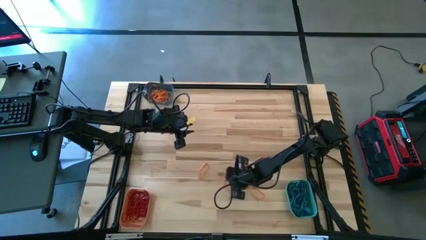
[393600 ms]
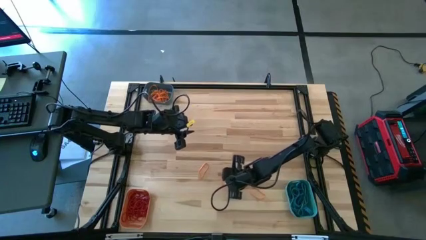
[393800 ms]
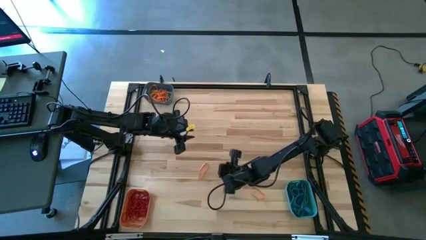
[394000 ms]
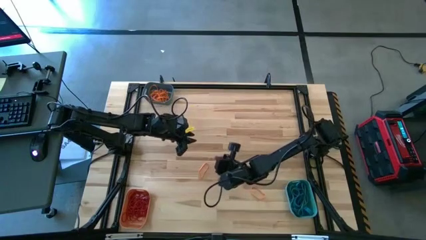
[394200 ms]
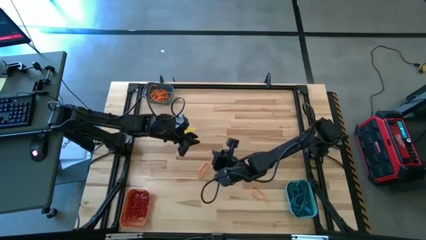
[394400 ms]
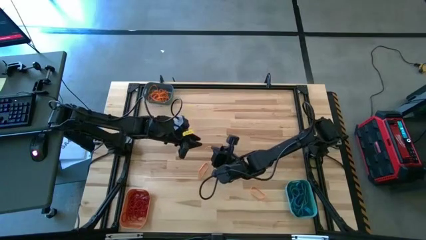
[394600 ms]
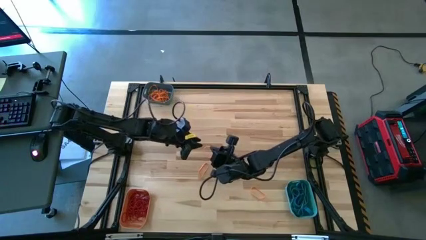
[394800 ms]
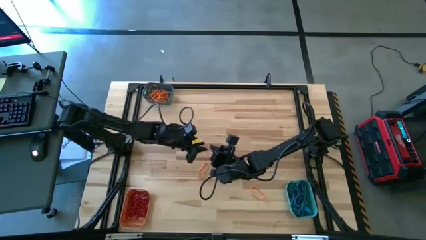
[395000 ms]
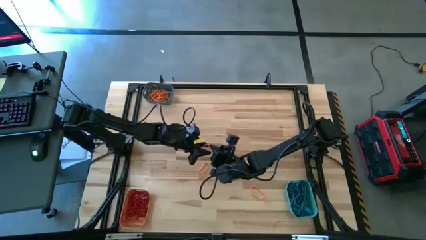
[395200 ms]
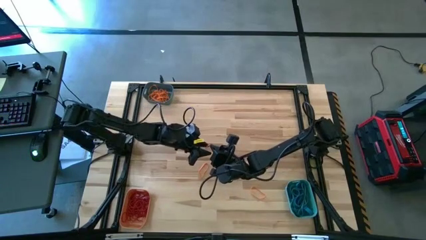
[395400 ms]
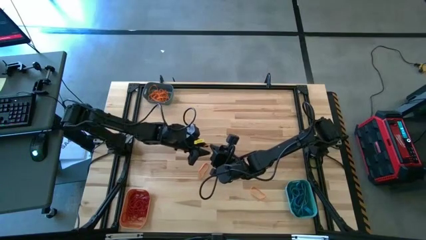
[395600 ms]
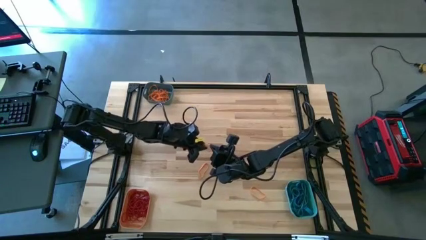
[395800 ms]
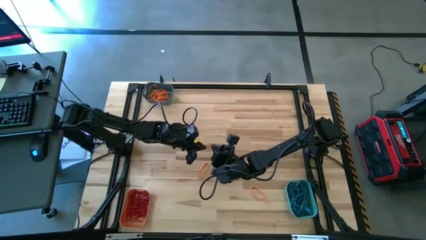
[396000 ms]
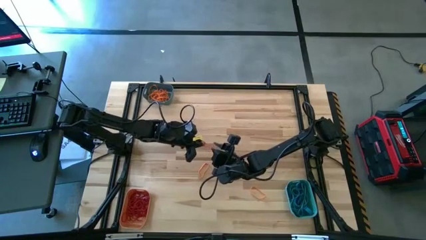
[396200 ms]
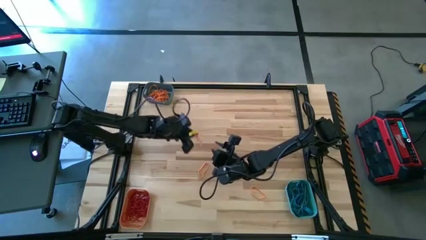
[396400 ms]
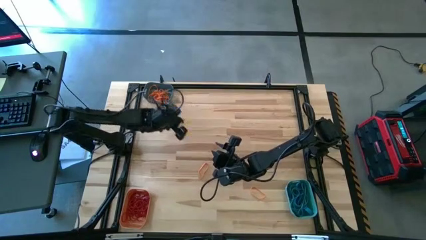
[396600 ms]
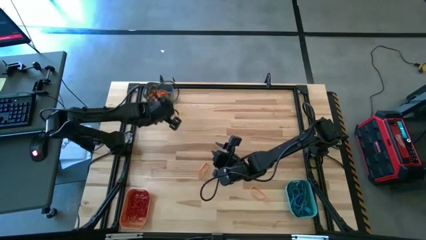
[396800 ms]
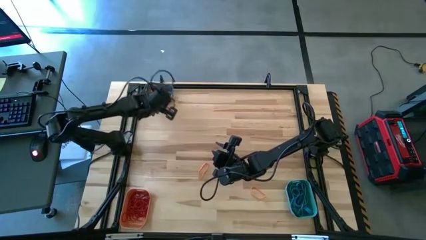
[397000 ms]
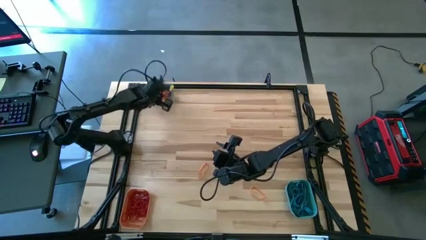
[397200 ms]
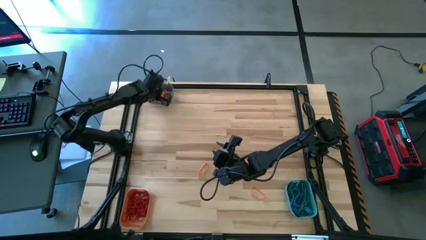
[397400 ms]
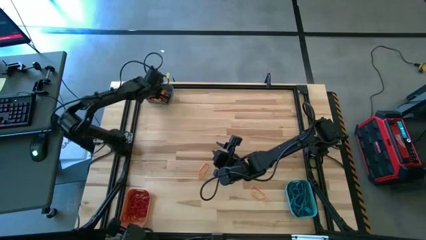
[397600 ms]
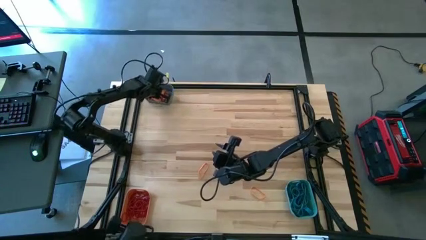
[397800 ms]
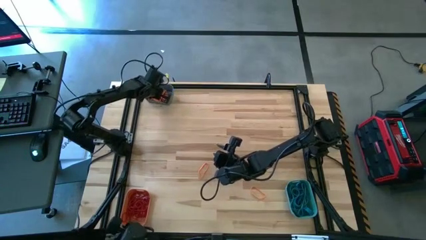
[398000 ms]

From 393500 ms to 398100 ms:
Task: Sort rubber bands into baskets
Put the orange rubber band into the blue bin

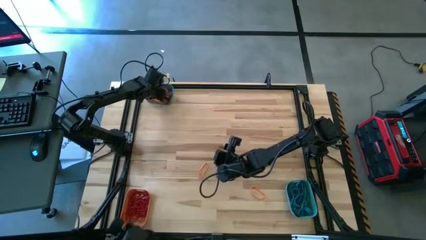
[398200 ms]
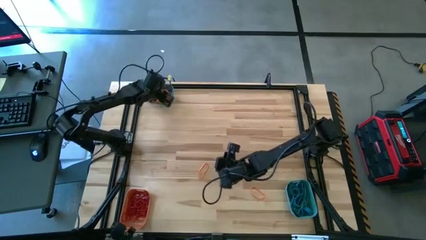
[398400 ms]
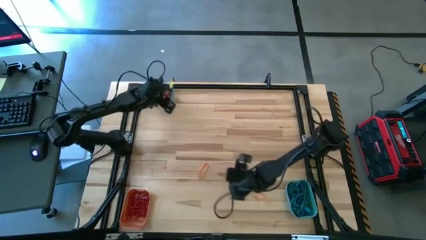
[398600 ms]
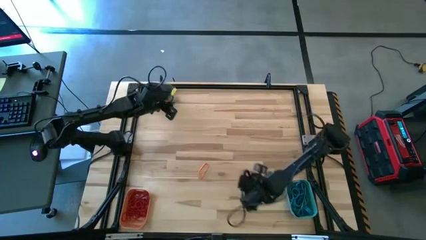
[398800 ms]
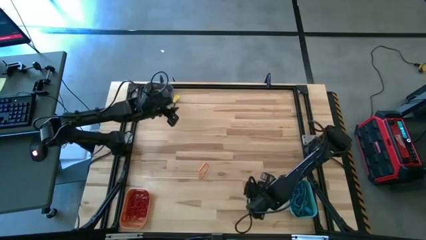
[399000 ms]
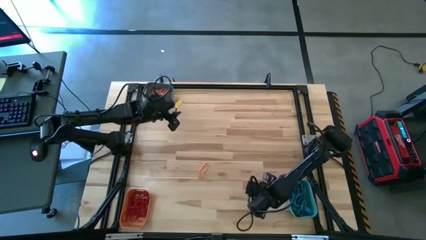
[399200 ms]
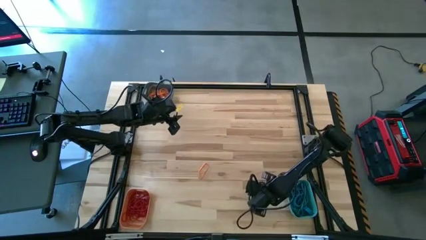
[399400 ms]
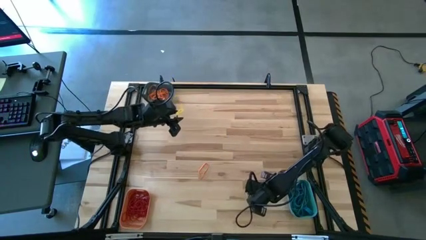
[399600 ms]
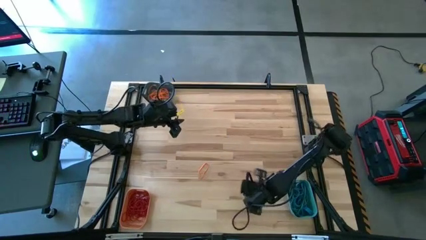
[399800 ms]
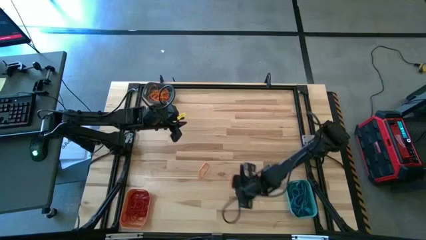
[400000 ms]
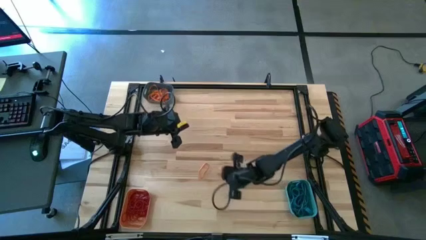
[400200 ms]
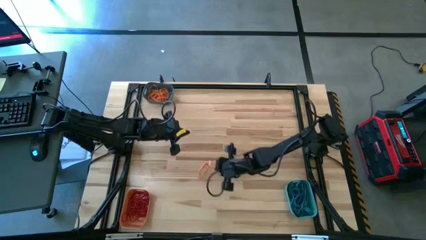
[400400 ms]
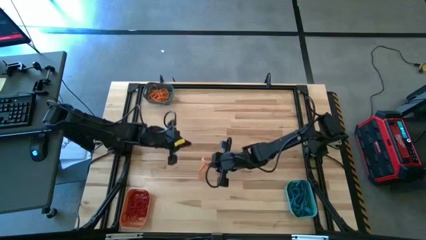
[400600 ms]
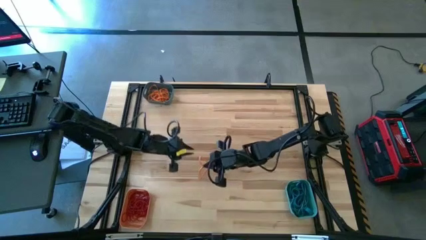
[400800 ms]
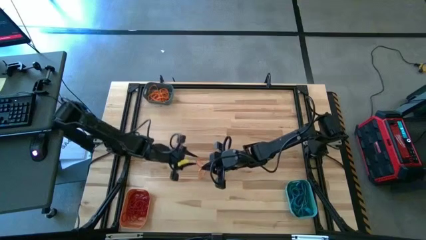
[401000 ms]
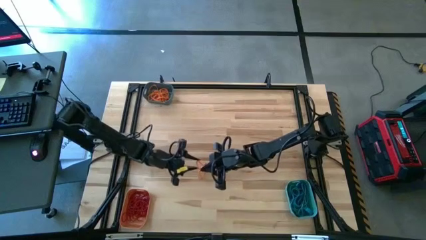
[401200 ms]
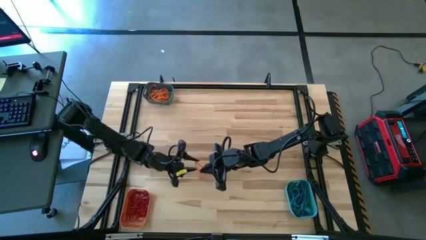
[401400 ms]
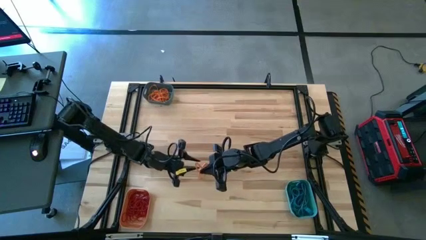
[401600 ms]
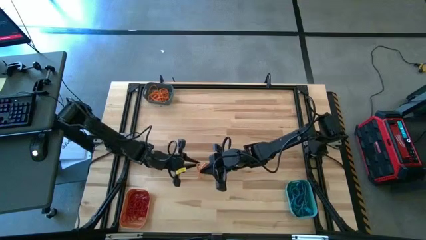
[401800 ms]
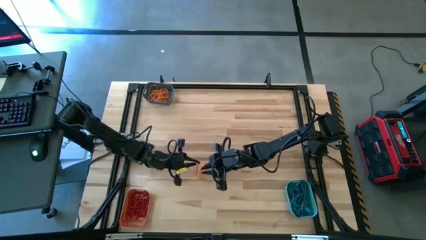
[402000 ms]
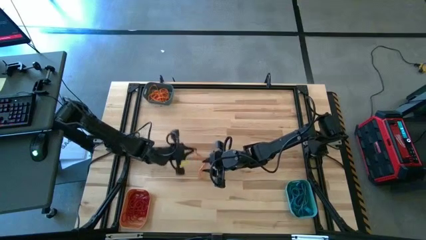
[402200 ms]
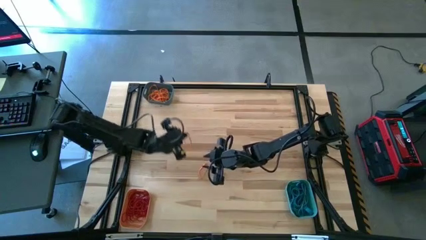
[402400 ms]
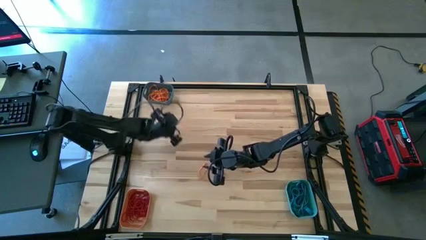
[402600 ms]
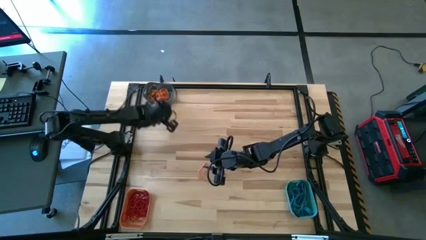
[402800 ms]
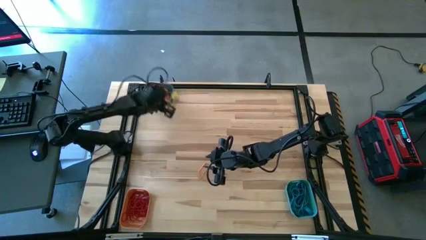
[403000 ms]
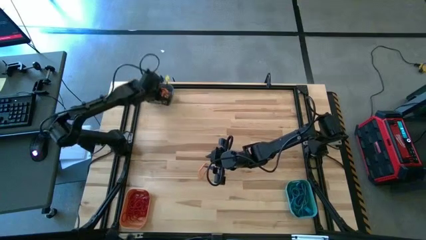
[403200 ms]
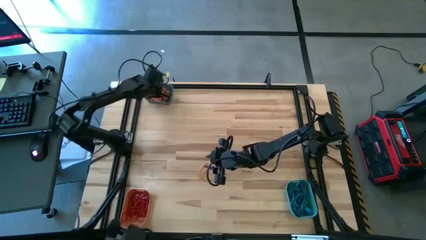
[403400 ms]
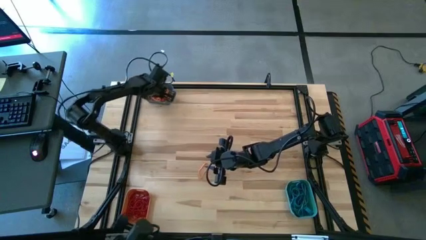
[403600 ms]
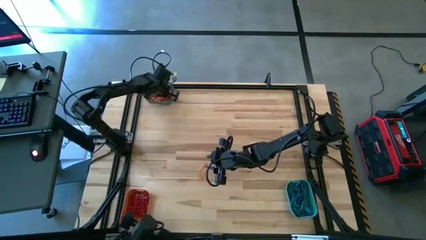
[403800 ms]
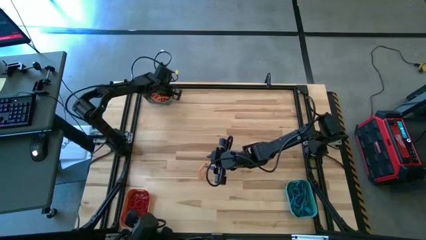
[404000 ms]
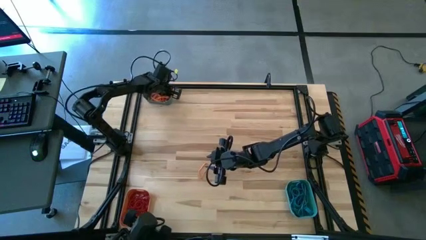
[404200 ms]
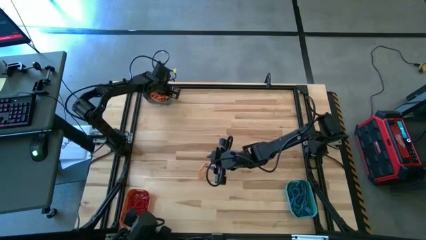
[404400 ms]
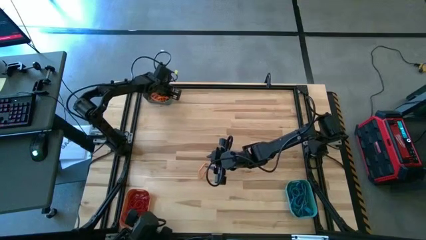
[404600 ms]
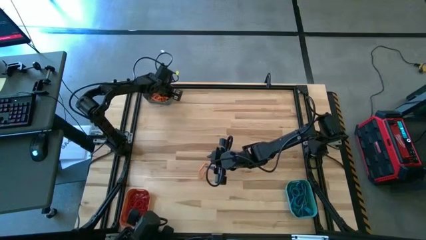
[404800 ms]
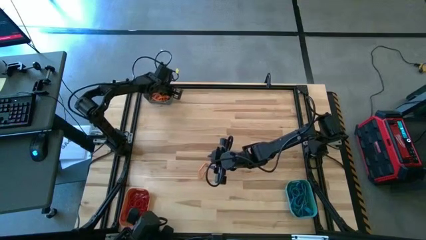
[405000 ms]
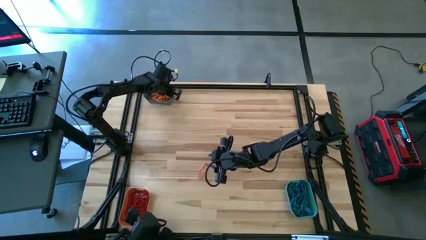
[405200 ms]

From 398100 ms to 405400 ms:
Put the orange rubber band into the blue bin

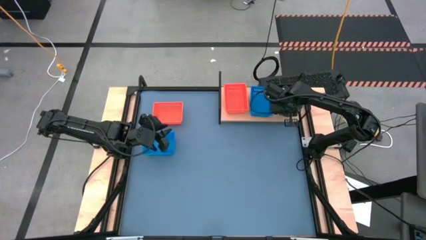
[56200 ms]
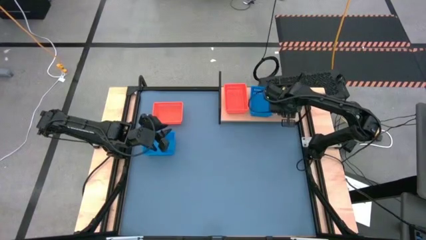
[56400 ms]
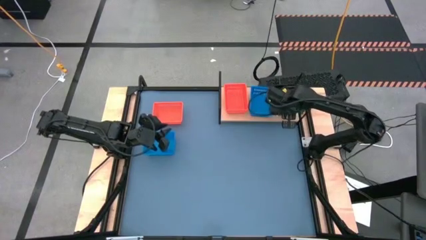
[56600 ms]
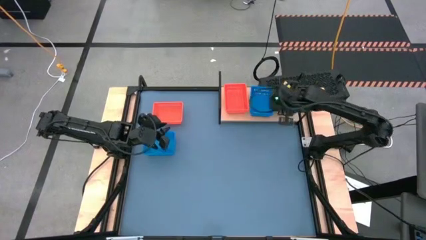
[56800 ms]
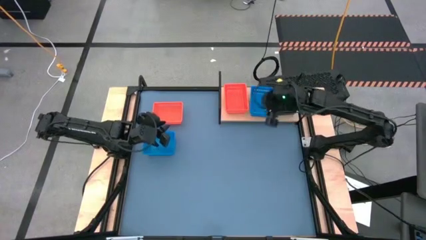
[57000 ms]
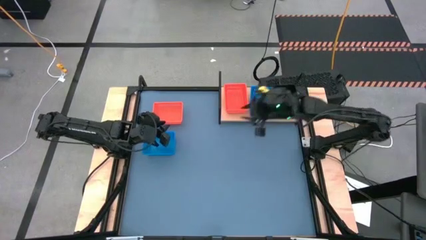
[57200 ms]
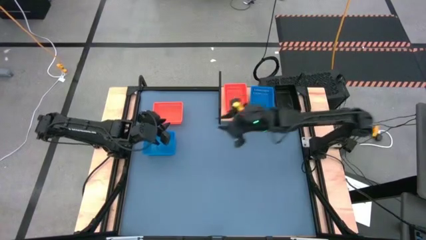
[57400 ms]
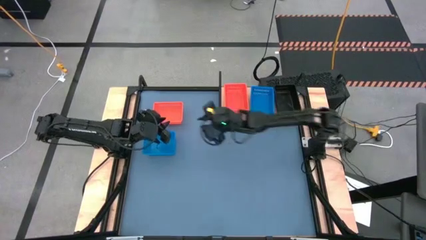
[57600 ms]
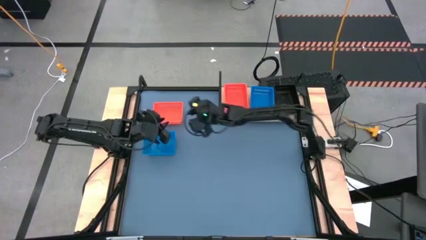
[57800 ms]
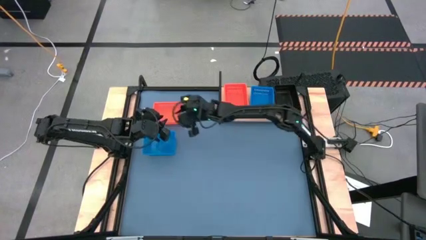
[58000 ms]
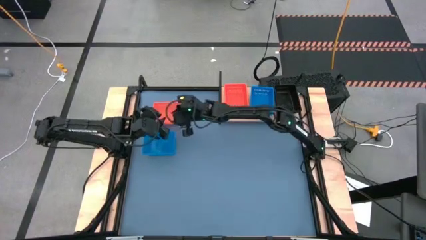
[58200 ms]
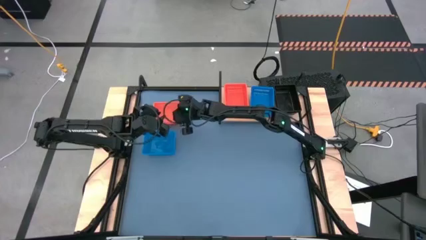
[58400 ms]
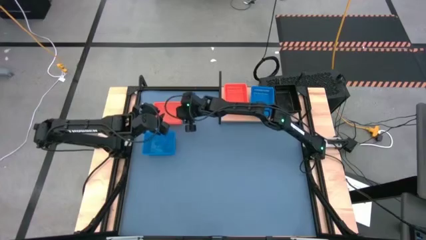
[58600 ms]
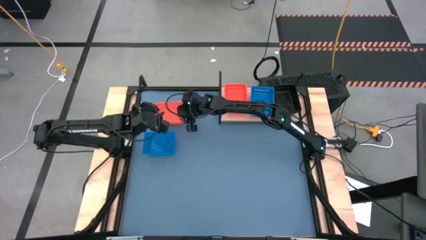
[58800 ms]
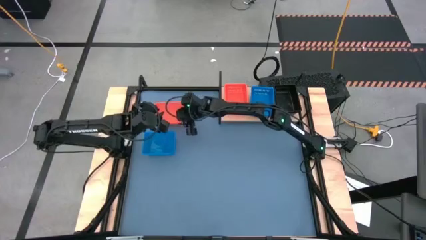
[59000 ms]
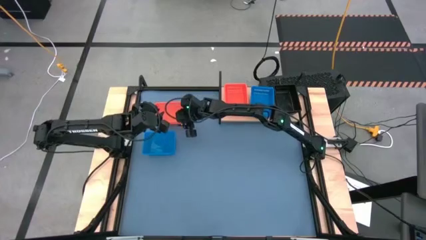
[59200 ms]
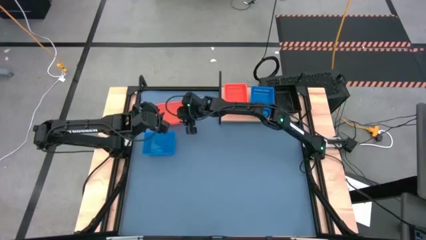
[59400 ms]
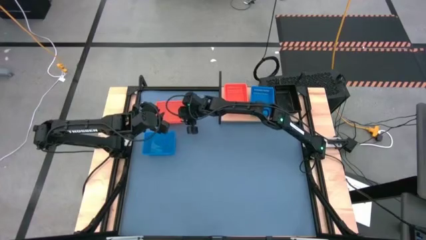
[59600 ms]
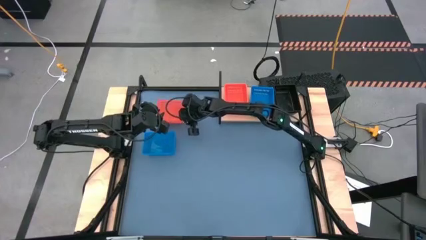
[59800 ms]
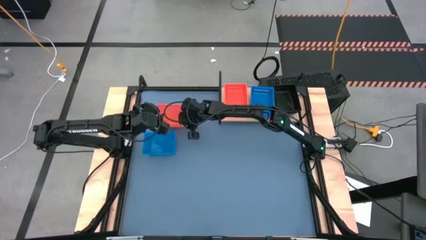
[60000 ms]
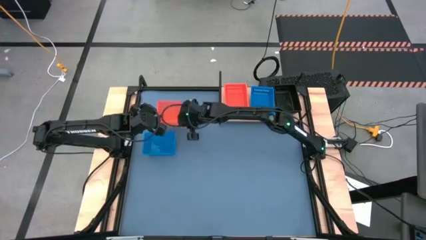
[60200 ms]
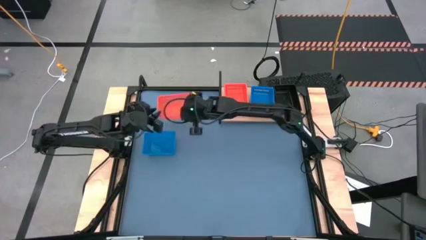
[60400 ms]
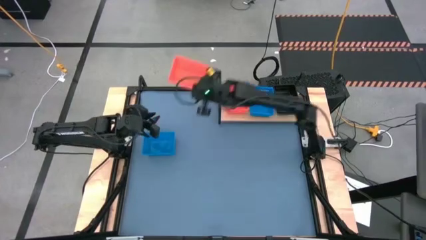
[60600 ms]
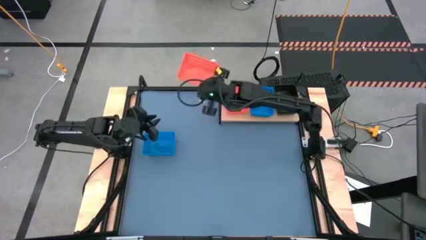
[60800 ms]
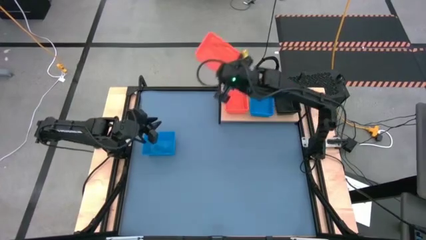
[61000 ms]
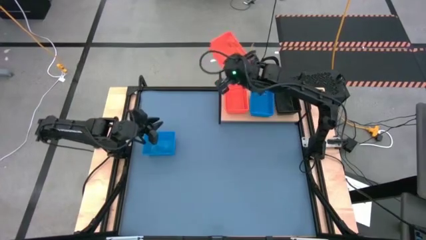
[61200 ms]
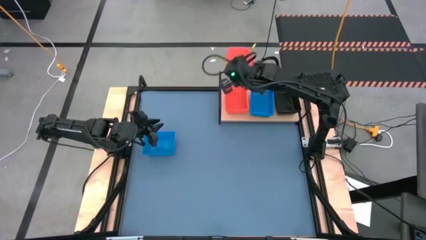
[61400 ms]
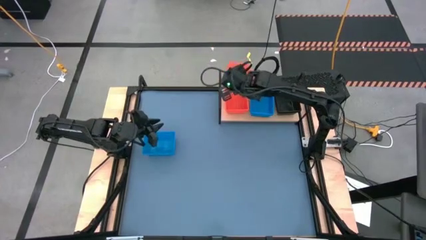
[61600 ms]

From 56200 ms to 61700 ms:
Task: Stack baskets on shelf by color
Put the orange basket on the shelf
